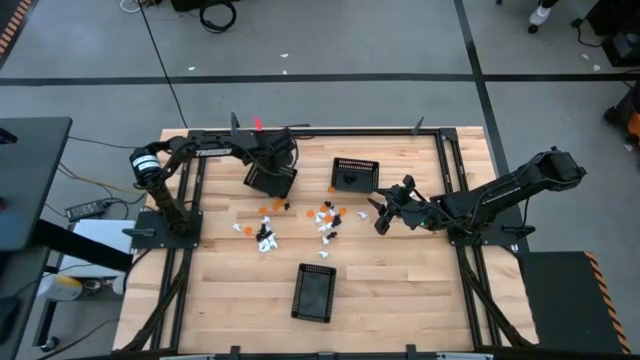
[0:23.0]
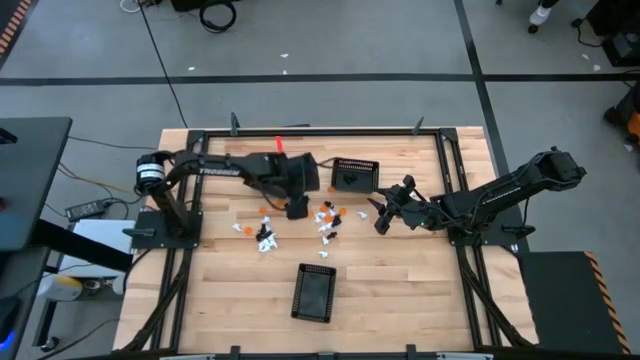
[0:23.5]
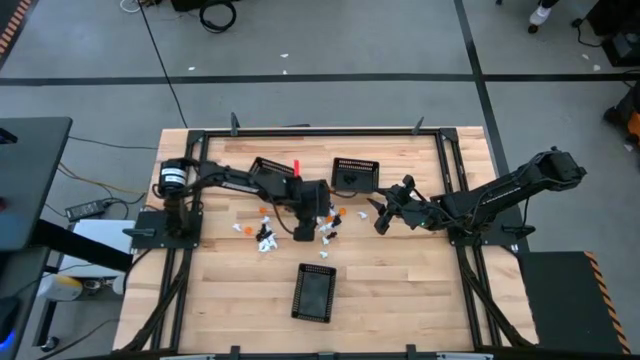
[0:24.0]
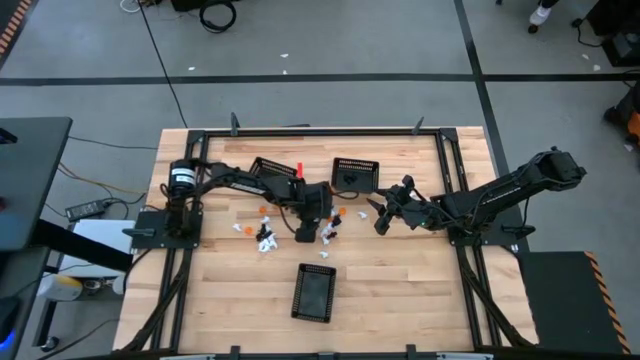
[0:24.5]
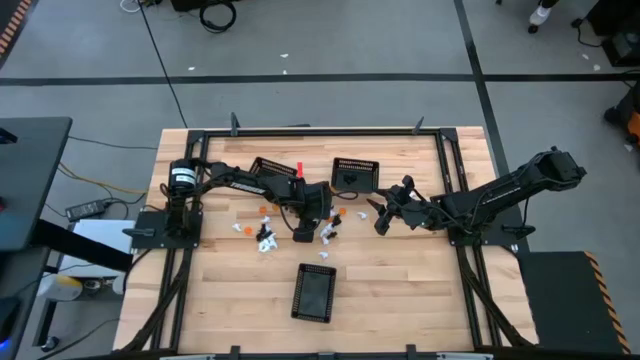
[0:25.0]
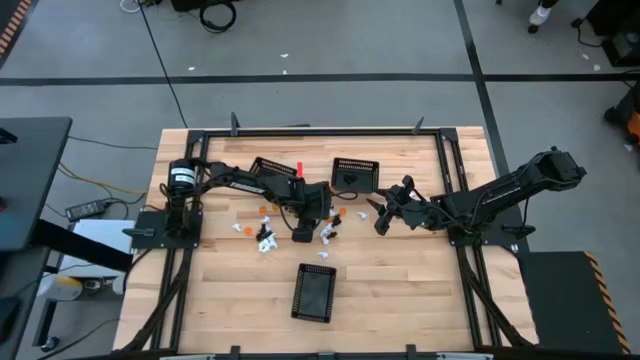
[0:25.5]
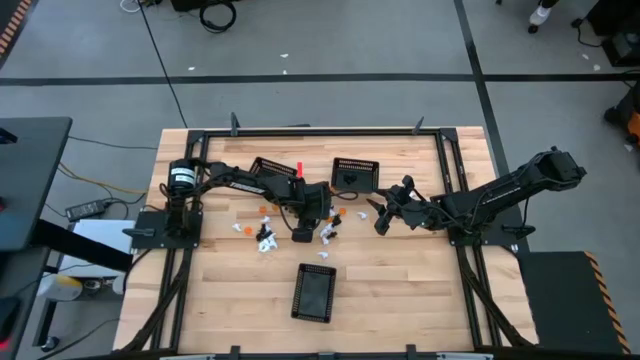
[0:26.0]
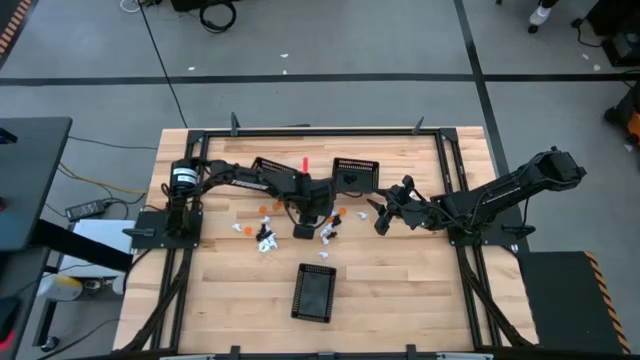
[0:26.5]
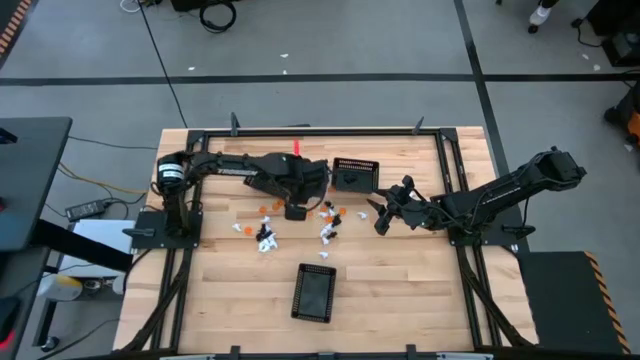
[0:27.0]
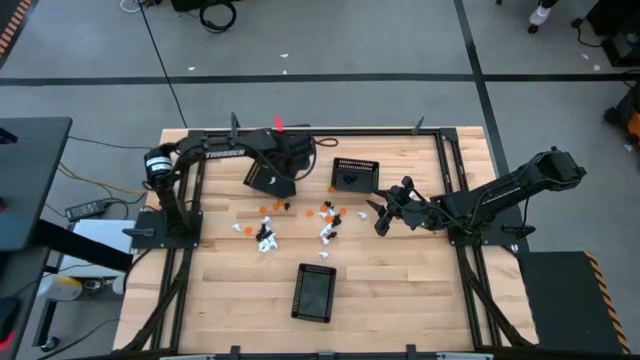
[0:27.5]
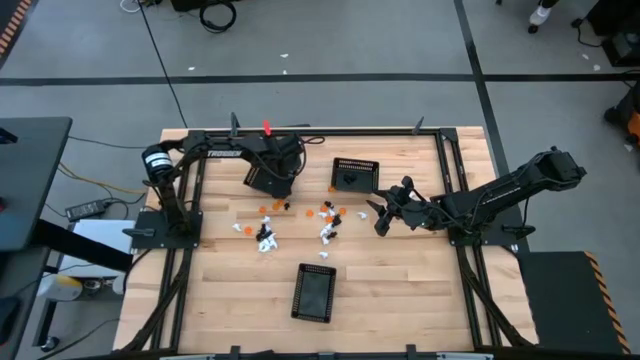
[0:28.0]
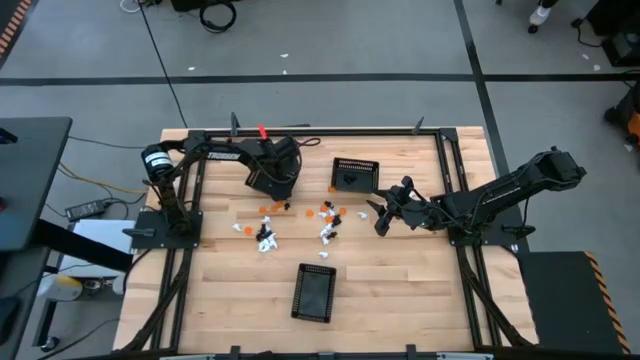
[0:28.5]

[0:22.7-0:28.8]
Task: Sort Halloween decoration
Put the white ghost toy into the top left black basket

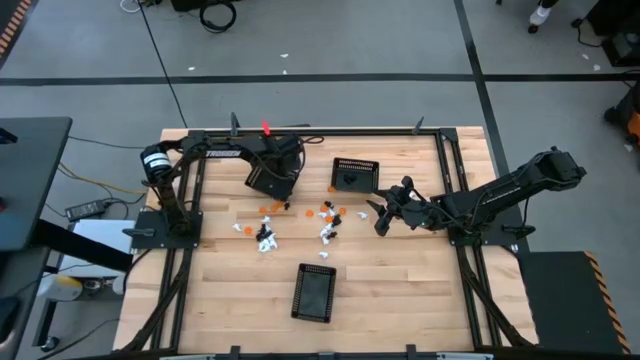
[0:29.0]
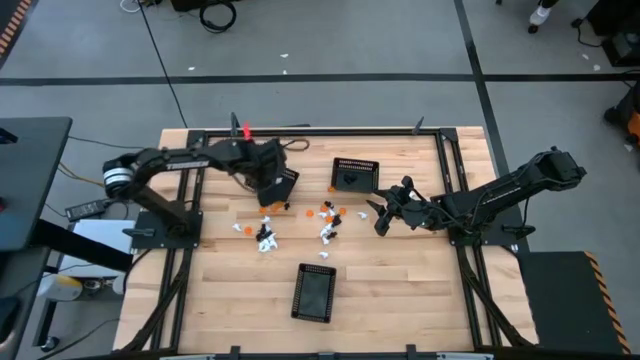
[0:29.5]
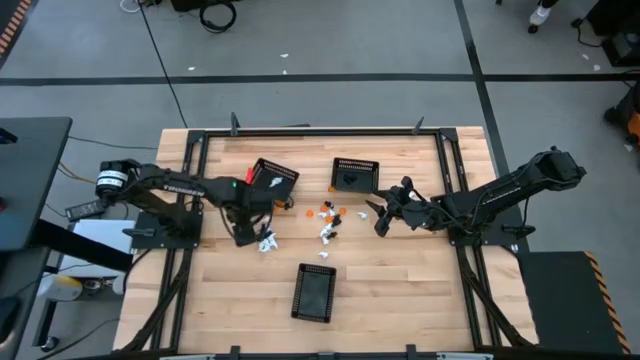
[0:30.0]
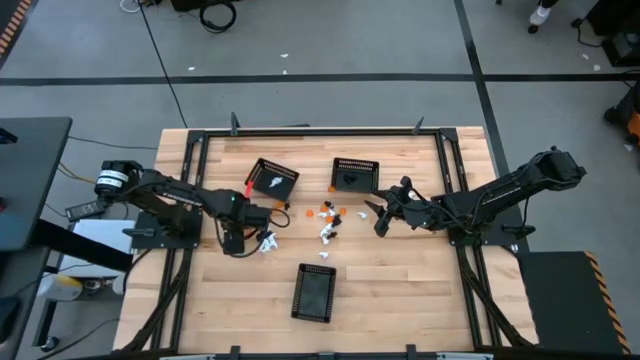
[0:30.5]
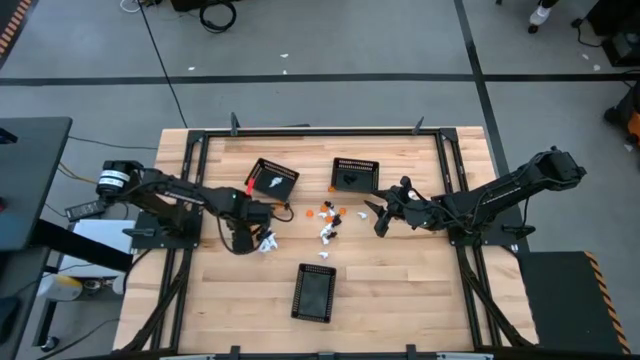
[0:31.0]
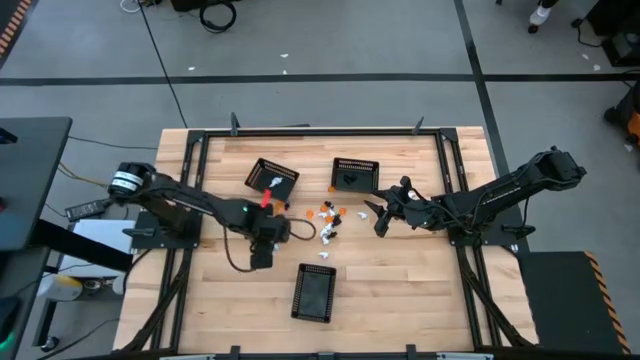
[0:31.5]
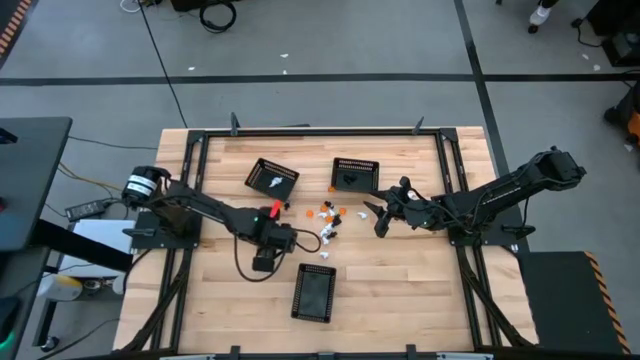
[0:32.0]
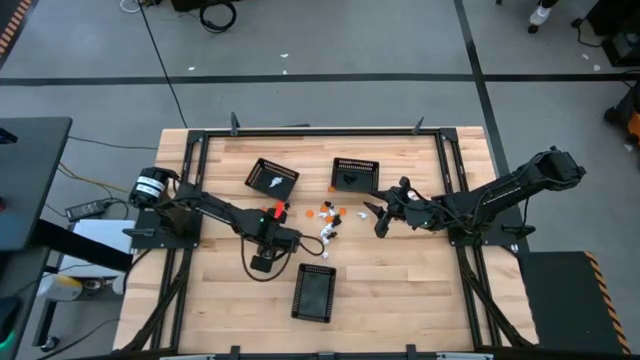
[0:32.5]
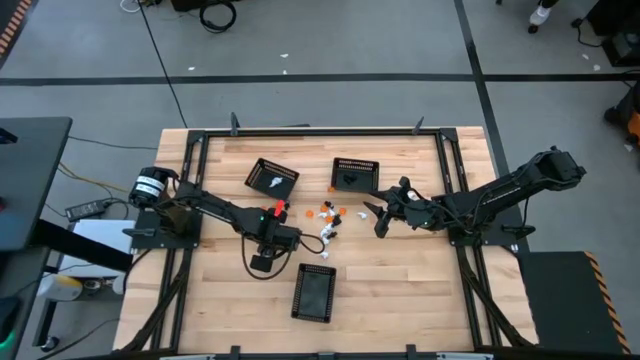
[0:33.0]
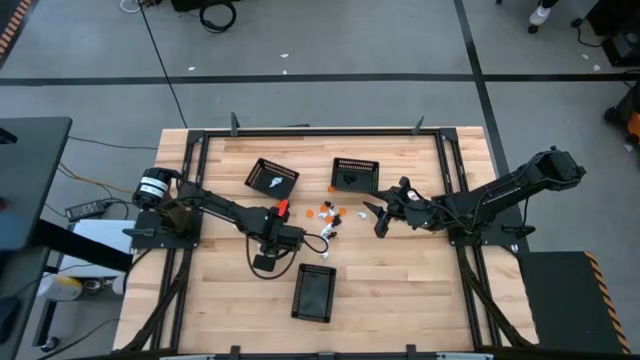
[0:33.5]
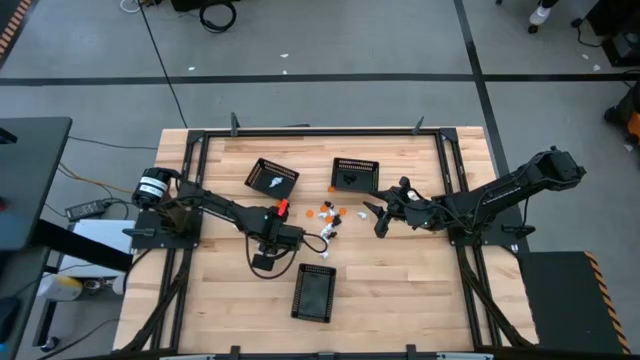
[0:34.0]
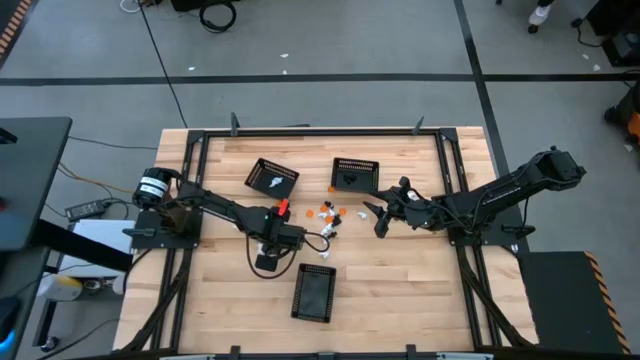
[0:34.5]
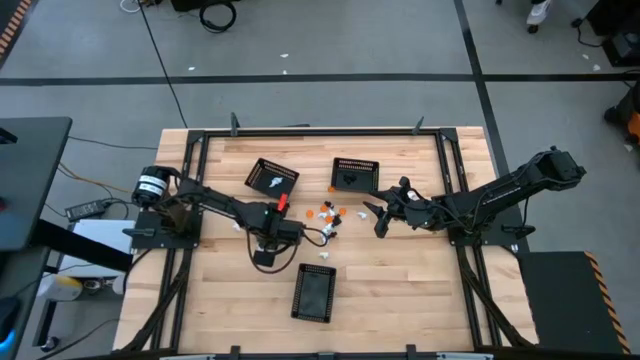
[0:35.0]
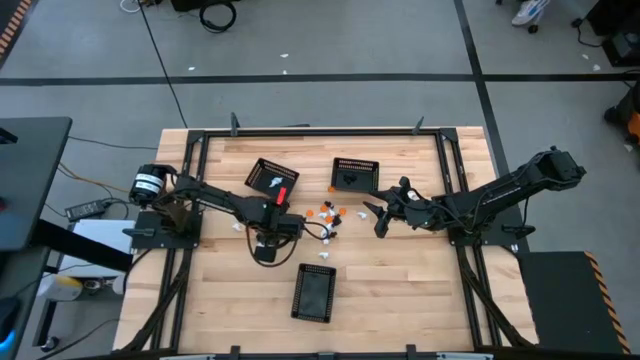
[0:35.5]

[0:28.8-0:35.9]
Put the white ghost toy into the top left black basket

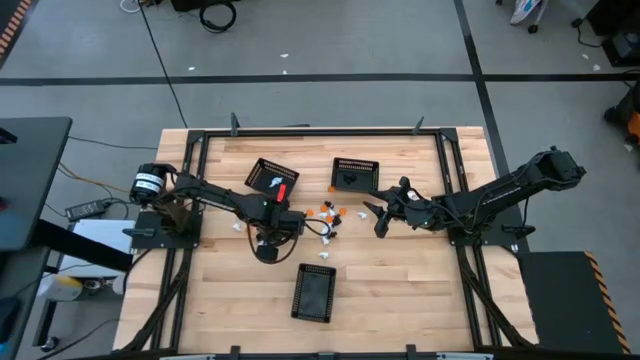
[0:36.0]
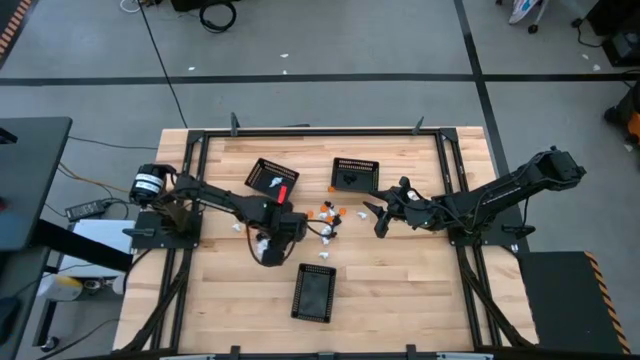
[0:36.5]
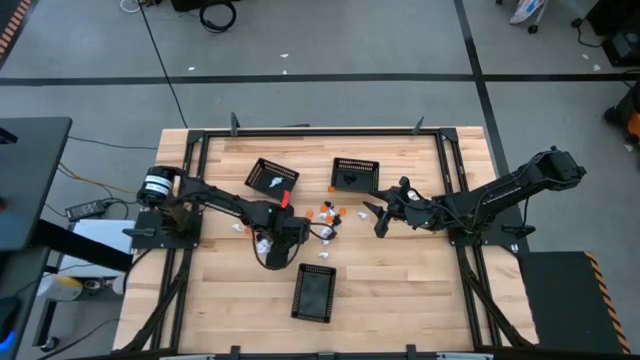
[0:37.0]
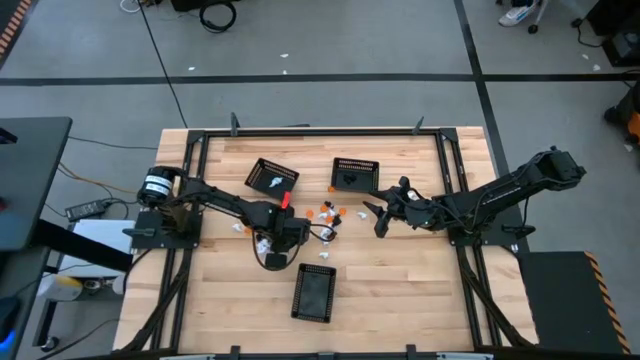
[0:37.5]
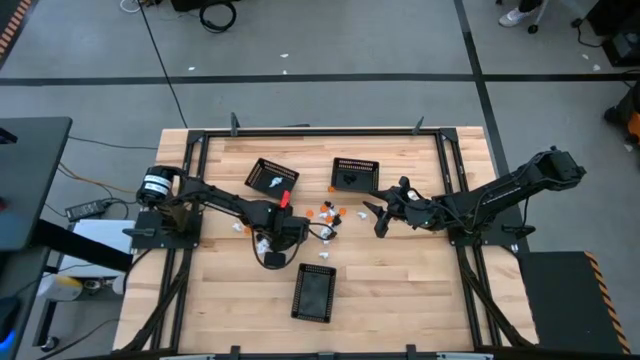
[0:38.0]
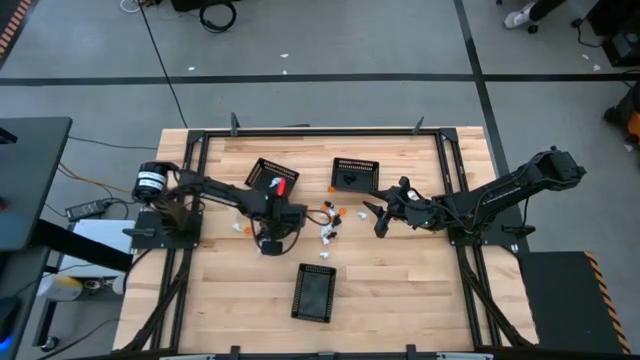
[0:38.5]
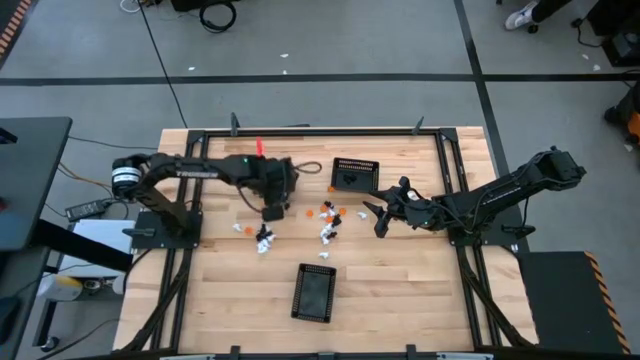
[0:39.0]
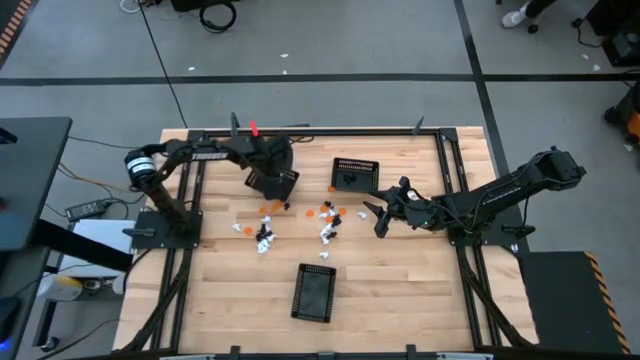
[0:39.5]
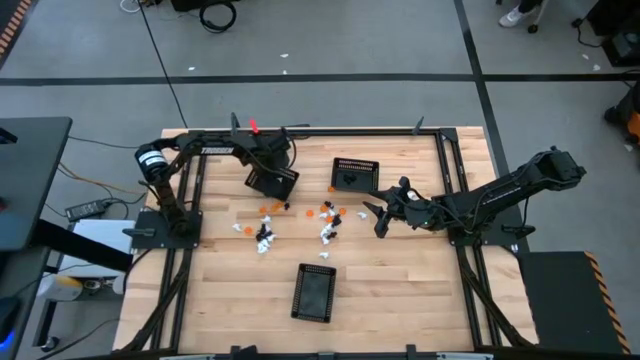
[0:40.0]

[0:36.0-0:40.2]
Put the white ghost toy into the top left black basket

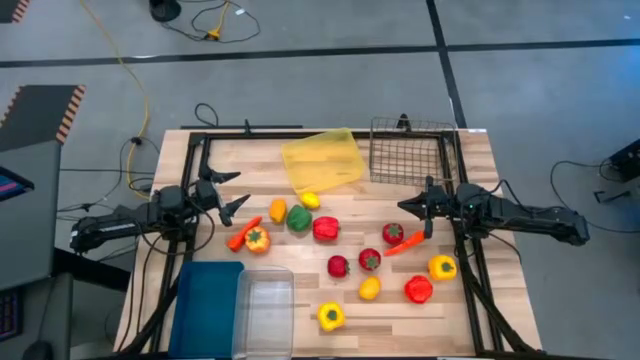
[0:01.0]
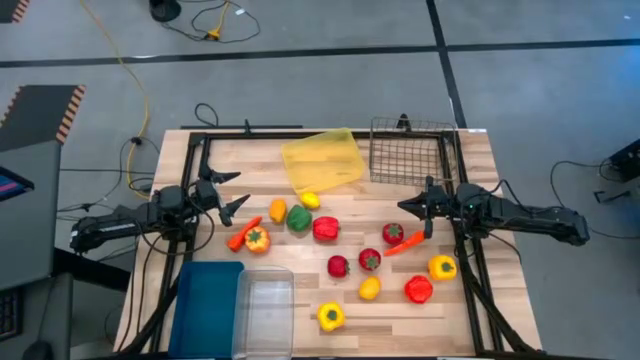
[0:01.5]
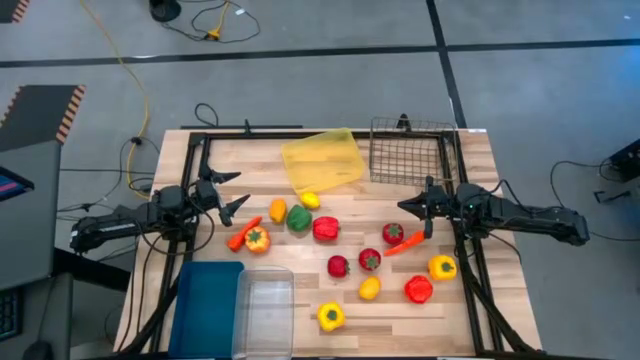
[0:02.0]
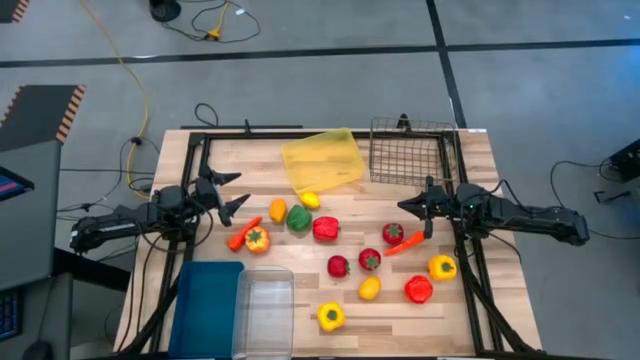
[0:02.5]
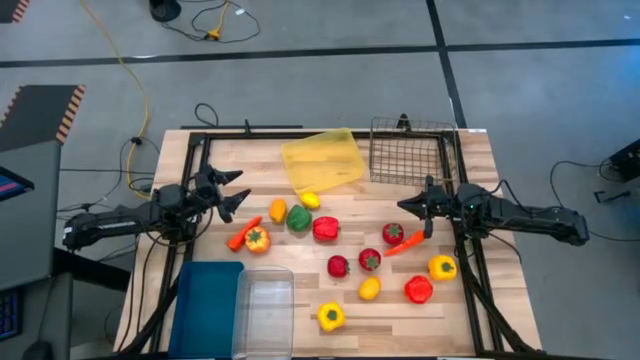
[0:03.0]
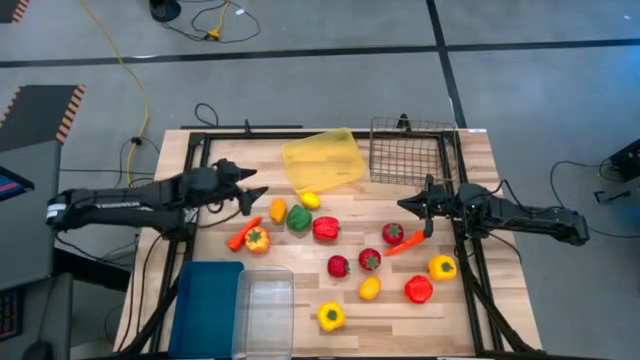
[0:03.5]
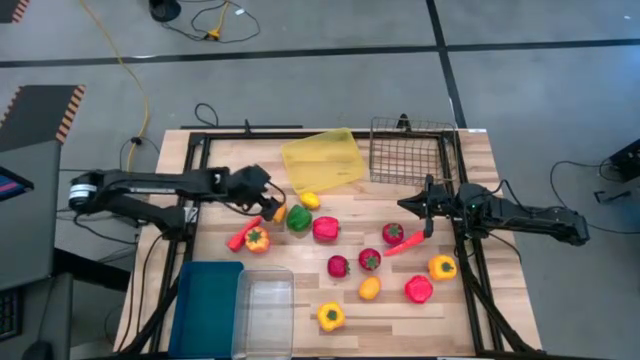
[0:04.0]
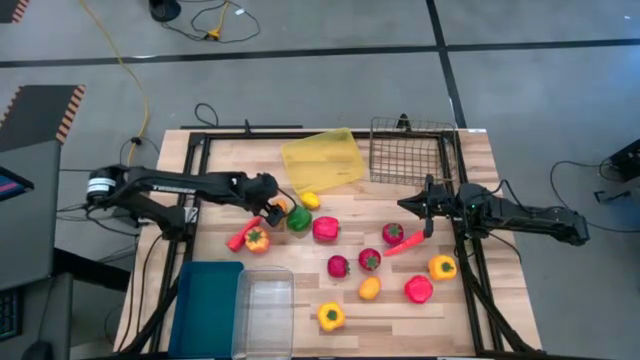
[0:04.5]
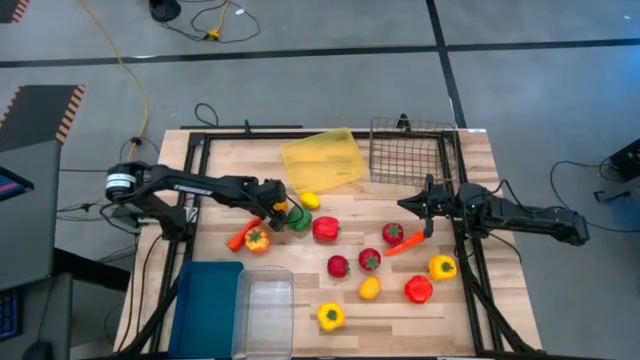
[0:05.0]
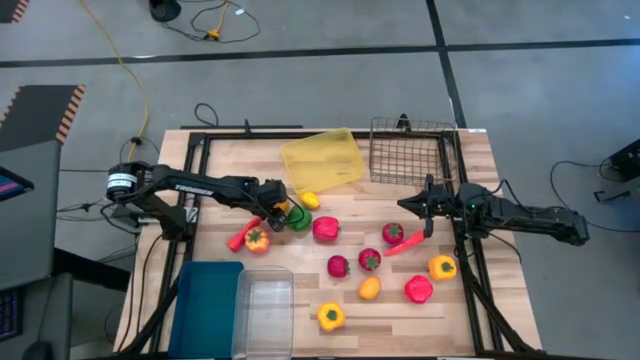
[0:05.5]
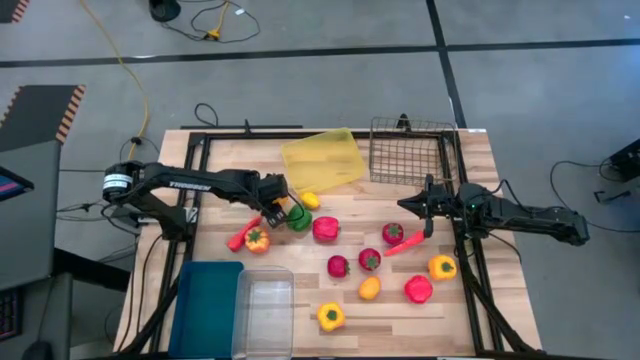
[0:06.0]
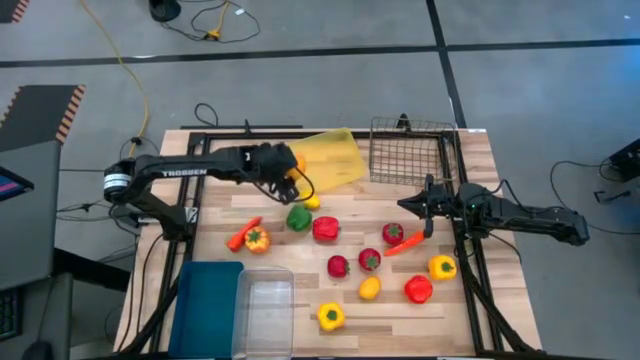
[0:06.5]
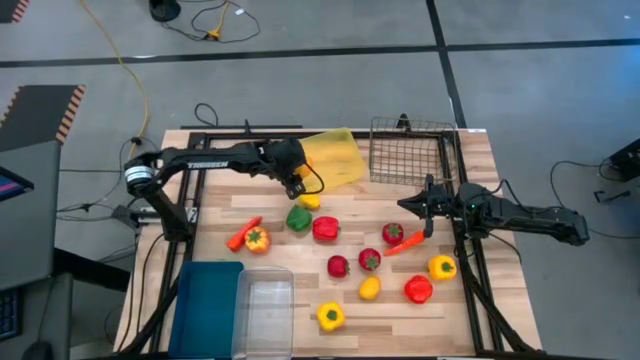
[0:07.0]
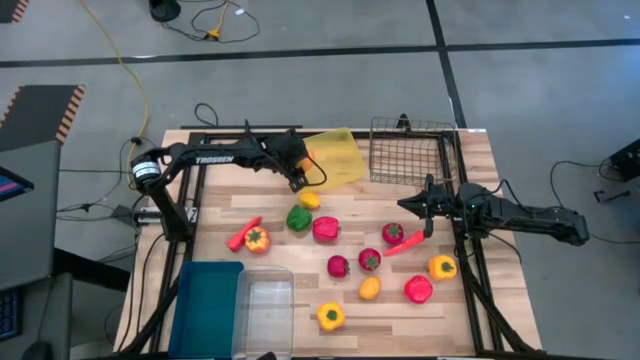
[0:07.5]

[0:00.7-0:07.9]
Task: Sort produce into baskets
Put the top left yellow lemon into the yellow bin
